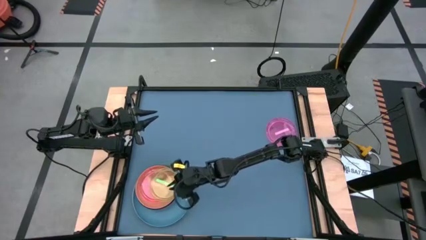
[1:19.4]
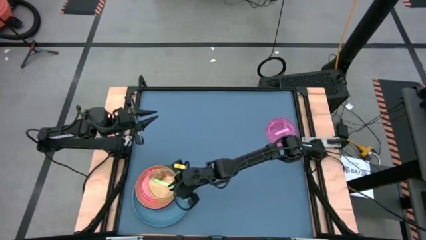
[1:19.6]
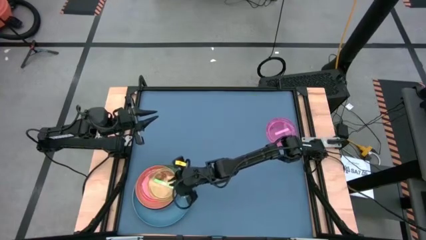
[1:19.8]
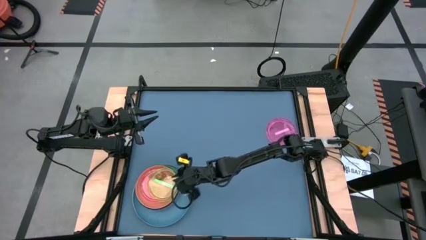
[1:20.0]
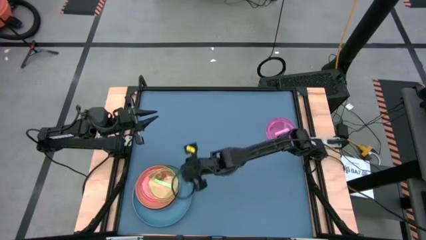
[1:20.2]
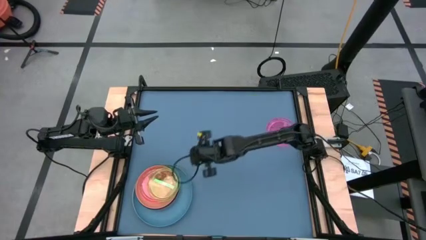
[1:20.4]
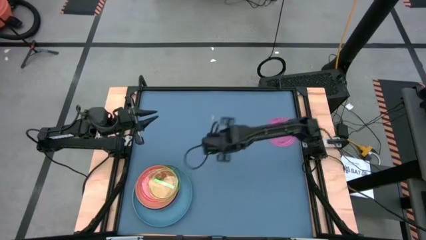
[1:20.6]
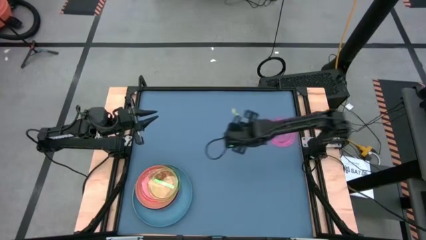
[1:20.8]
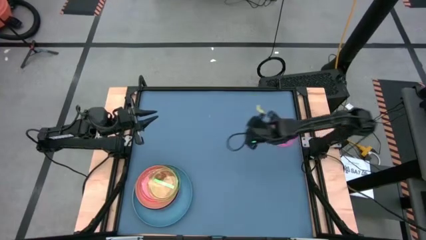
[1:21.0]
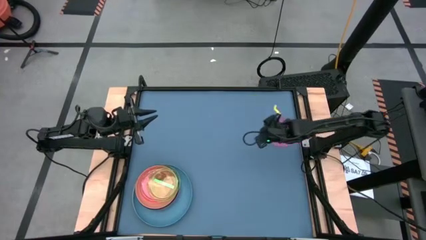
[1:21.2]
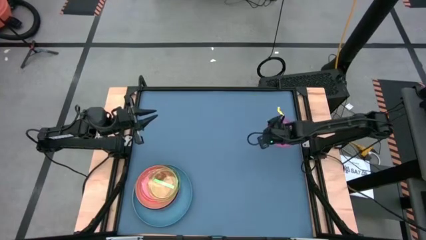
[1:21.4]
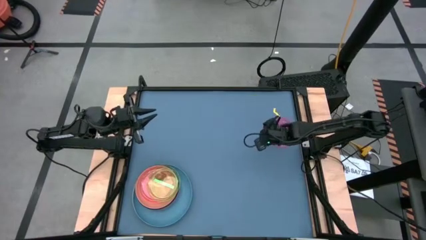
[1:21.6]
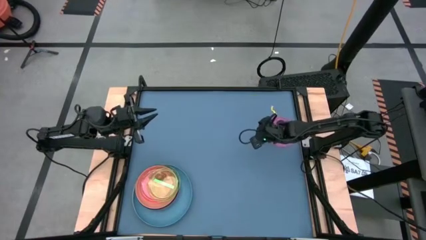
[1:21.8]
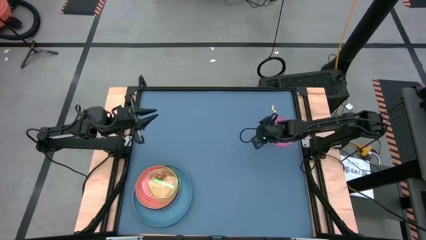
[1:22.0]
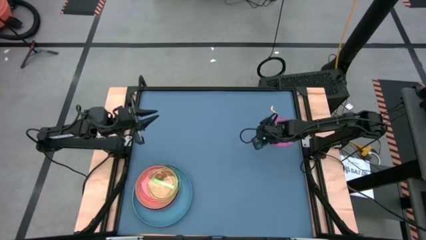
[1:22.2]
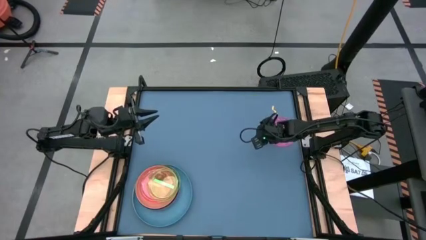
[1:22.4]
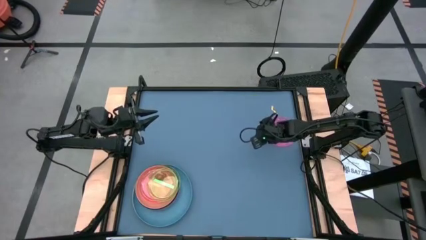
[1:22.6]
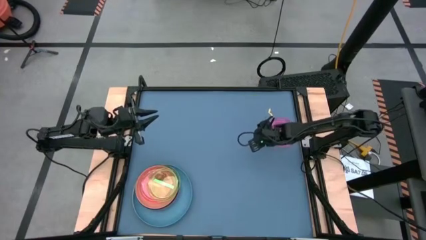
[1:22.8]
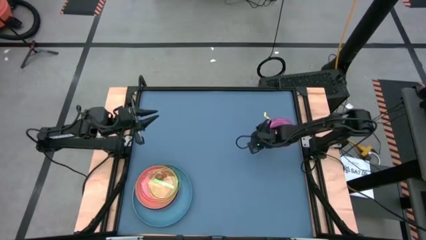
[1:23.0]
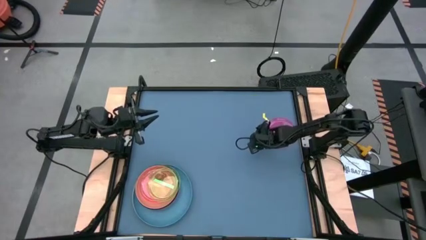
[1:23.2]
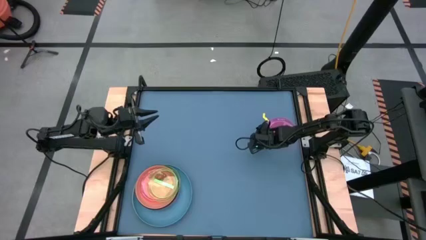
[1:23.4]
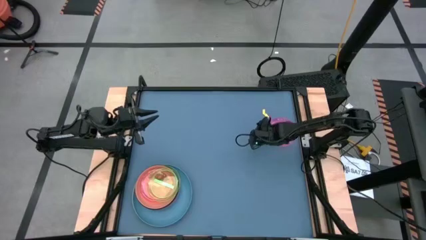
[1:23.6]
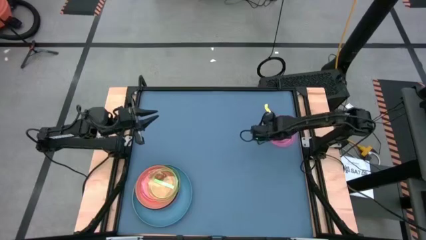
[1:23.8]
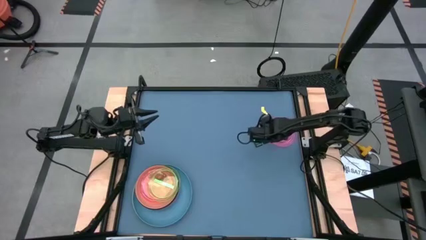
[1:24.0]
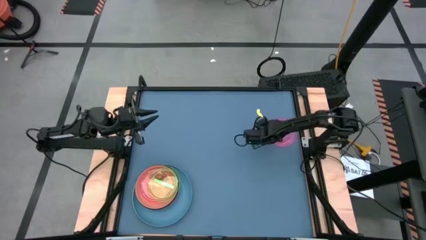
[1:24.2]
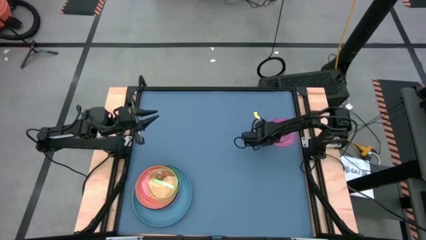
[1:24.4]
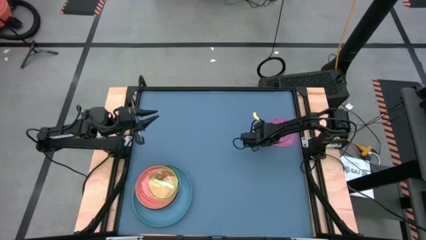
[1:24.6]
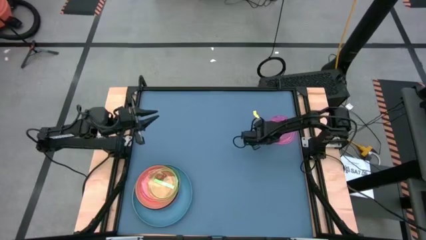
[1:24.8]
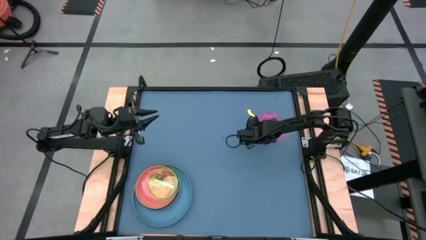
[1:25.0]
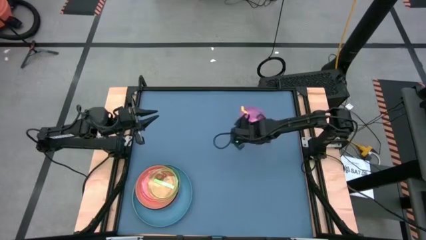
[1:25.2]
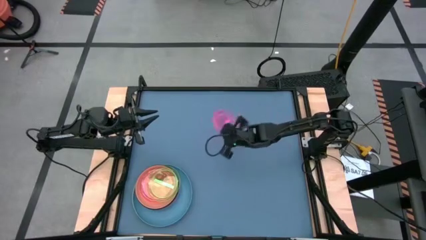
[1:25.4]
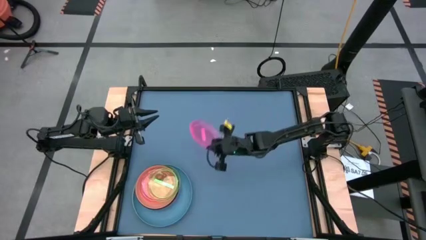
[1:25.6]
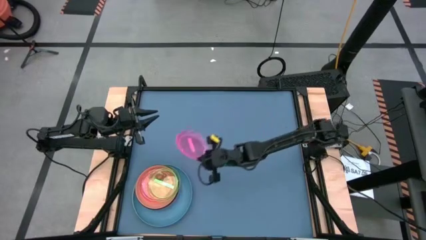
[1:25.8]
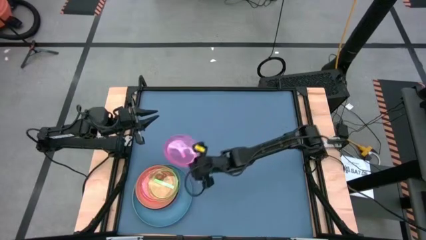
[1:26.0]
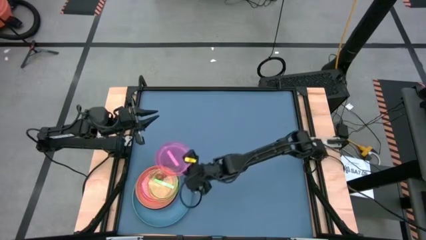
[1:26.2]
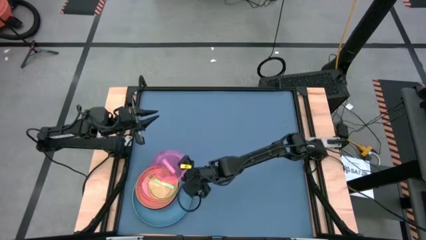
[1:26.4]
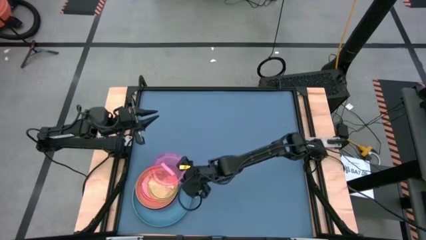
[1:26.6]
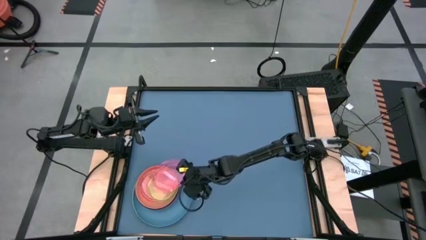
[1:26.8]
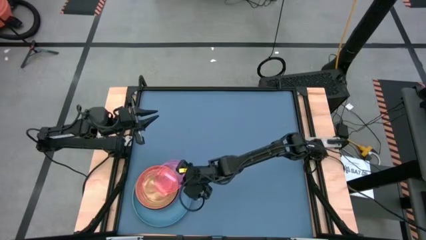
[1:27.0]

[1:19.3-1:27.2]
Task: Stack plastic plates
Stack the pink plate on top of the green plate

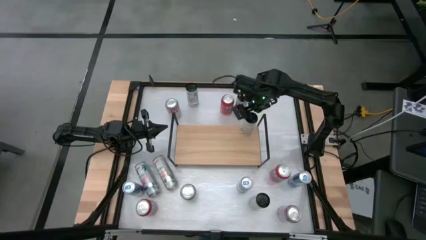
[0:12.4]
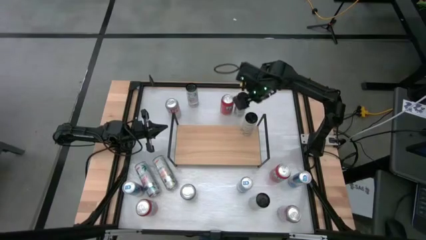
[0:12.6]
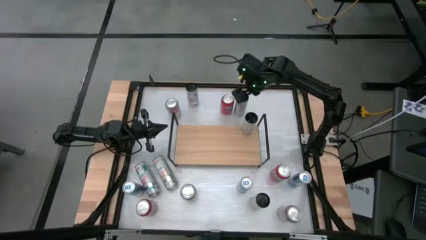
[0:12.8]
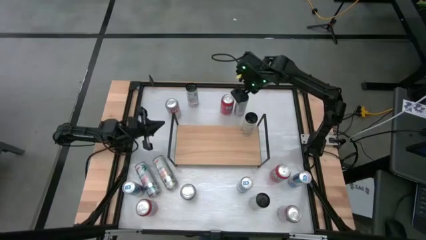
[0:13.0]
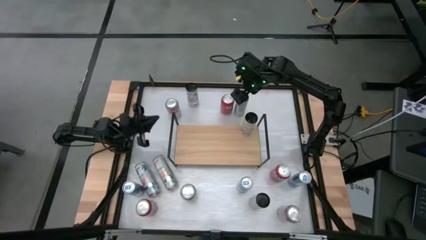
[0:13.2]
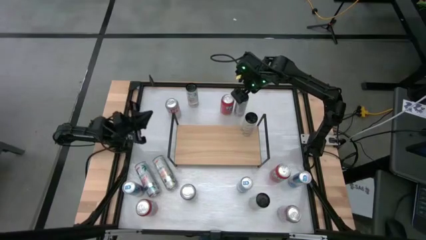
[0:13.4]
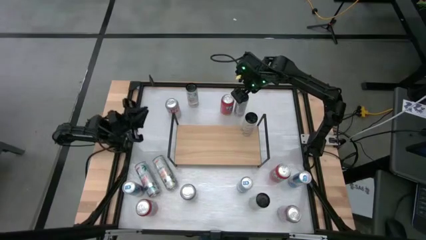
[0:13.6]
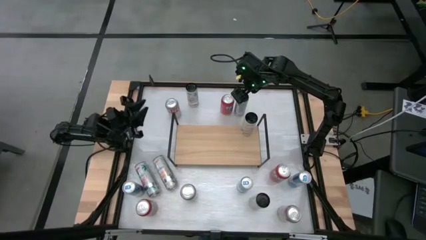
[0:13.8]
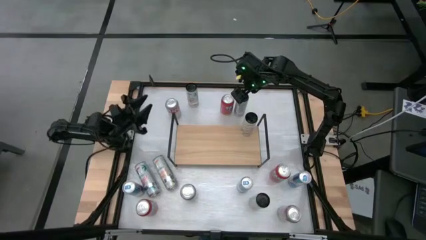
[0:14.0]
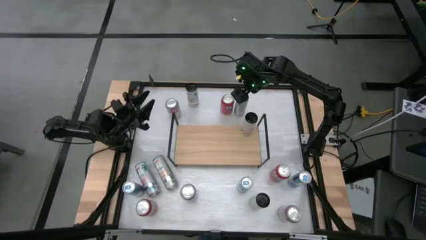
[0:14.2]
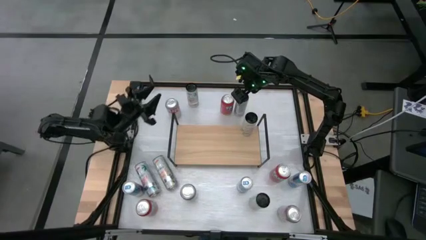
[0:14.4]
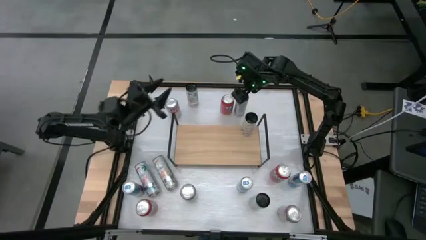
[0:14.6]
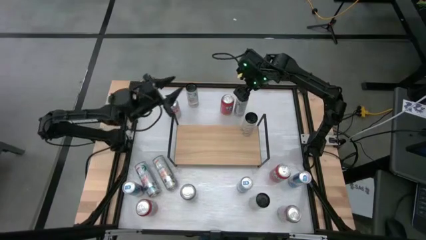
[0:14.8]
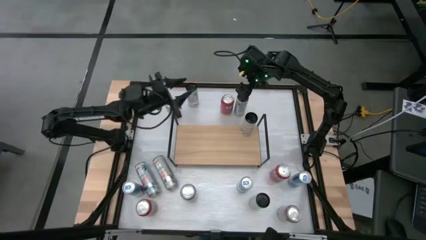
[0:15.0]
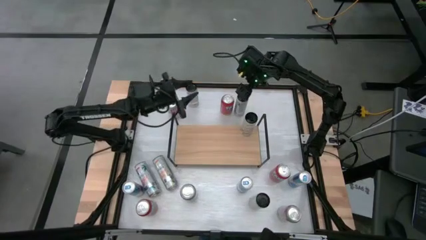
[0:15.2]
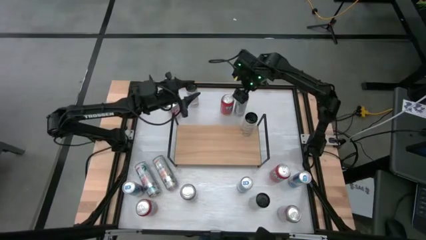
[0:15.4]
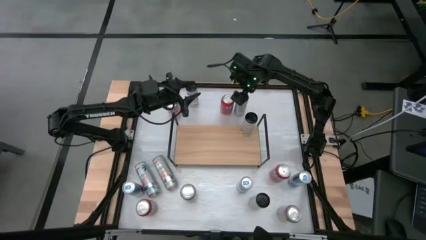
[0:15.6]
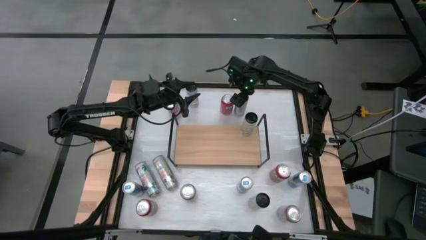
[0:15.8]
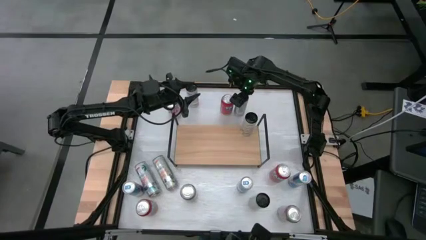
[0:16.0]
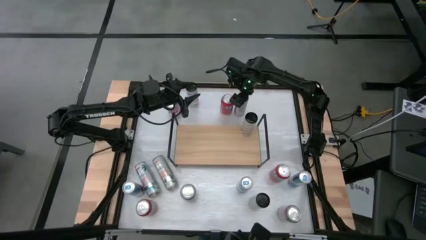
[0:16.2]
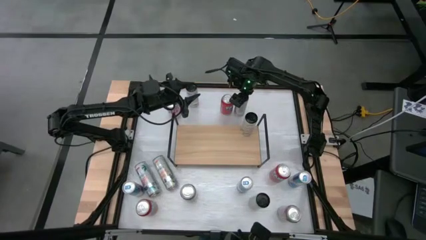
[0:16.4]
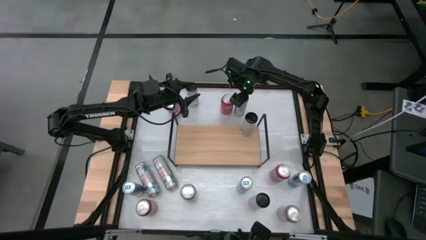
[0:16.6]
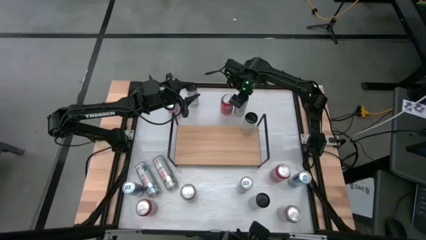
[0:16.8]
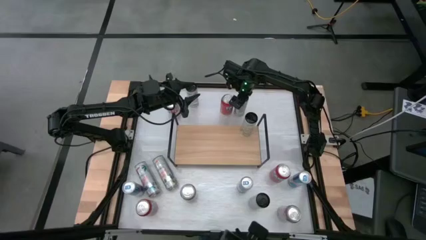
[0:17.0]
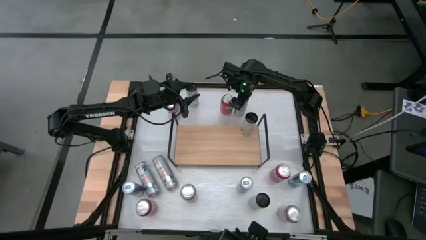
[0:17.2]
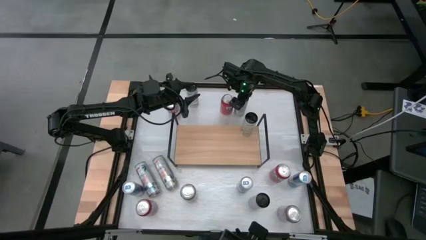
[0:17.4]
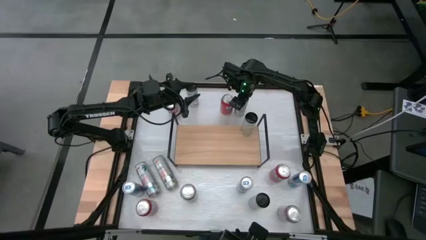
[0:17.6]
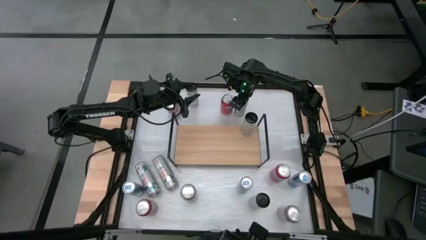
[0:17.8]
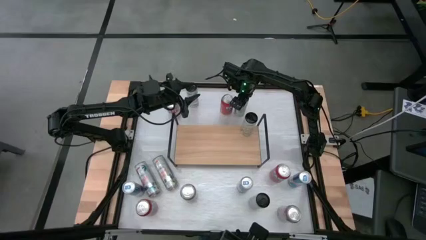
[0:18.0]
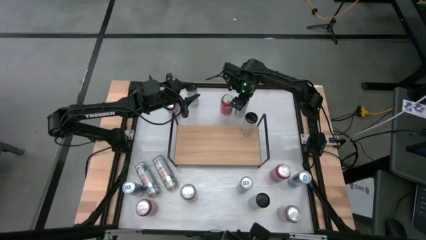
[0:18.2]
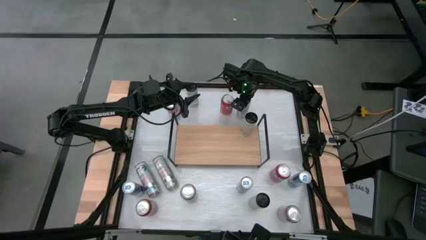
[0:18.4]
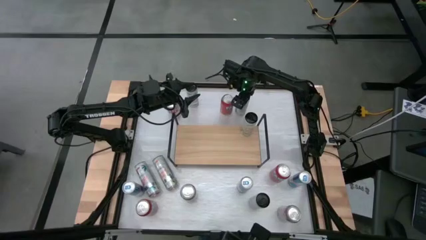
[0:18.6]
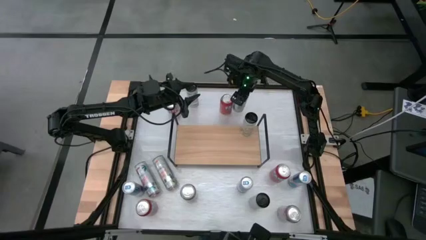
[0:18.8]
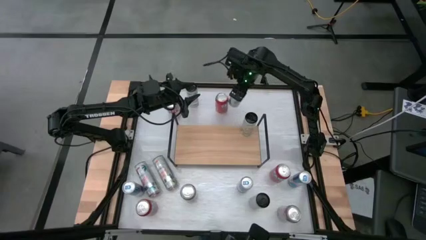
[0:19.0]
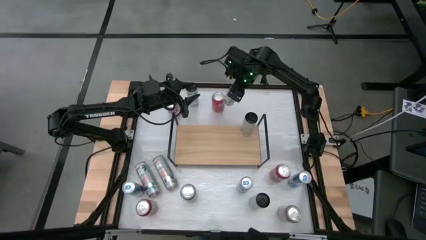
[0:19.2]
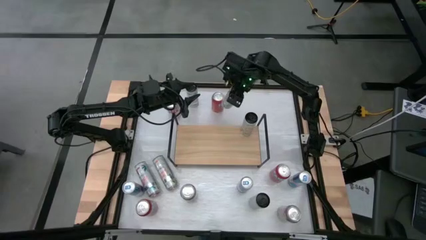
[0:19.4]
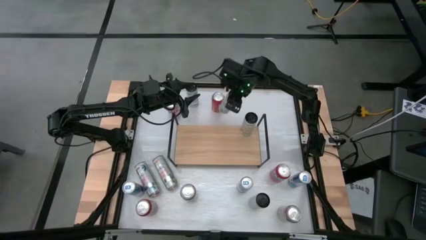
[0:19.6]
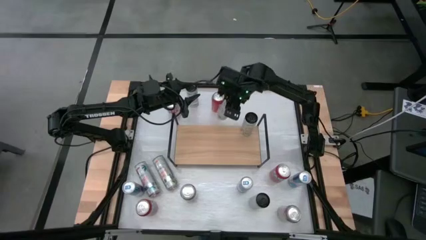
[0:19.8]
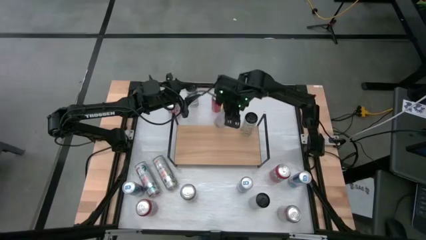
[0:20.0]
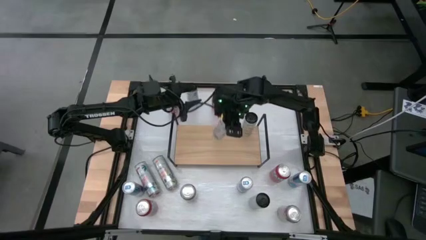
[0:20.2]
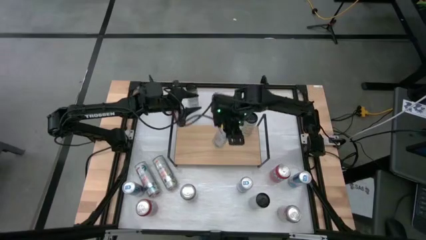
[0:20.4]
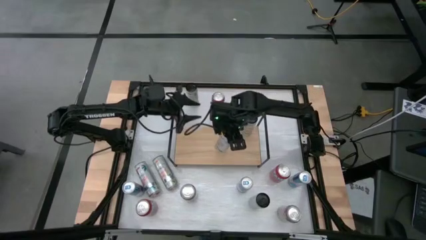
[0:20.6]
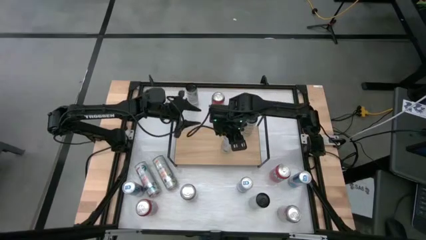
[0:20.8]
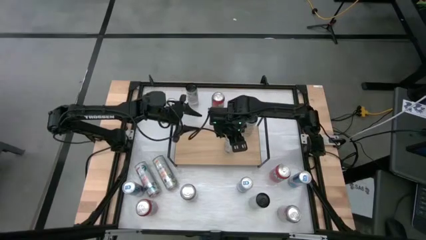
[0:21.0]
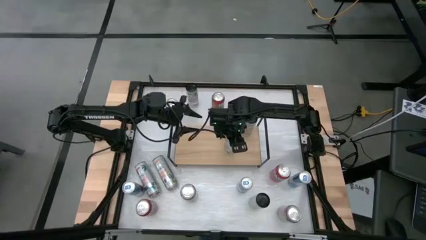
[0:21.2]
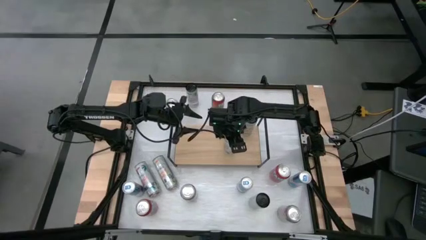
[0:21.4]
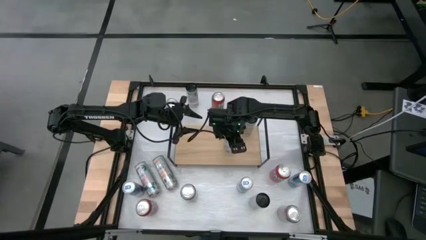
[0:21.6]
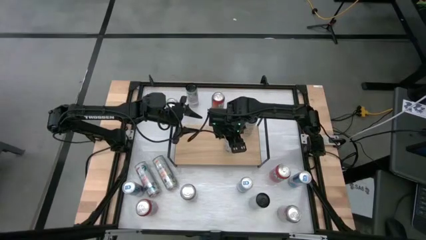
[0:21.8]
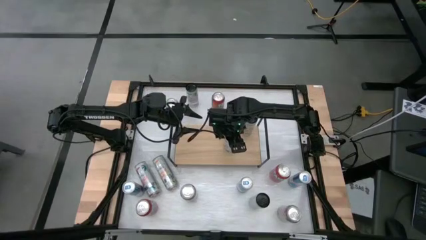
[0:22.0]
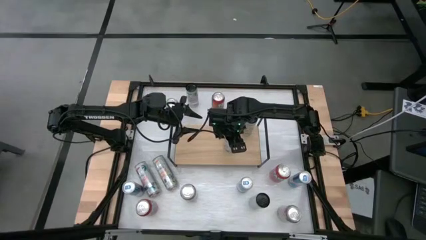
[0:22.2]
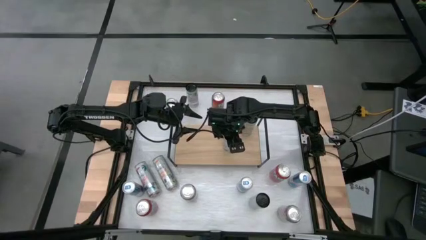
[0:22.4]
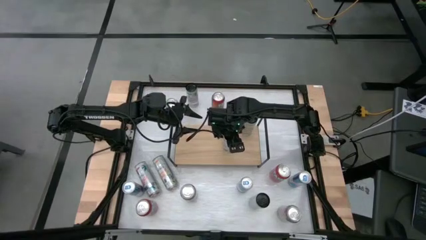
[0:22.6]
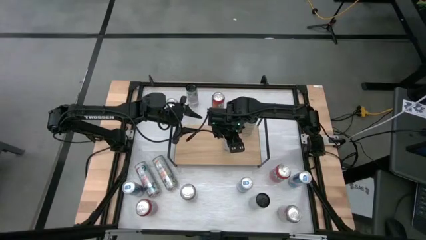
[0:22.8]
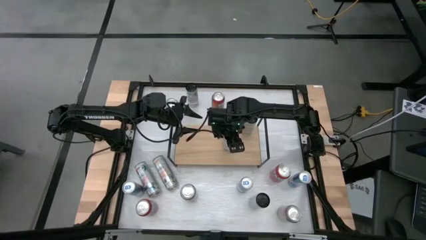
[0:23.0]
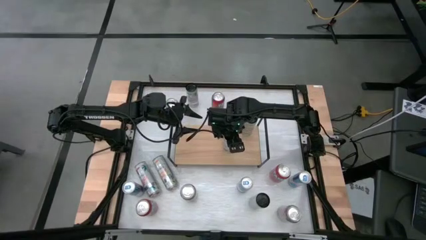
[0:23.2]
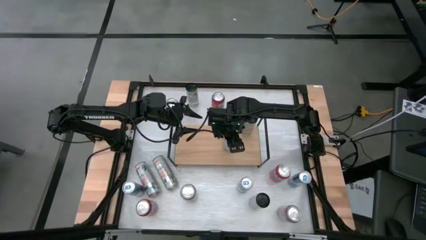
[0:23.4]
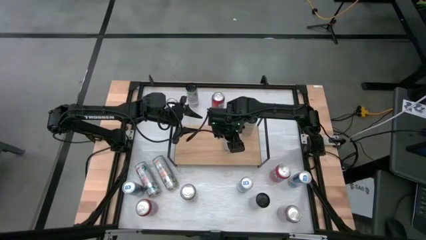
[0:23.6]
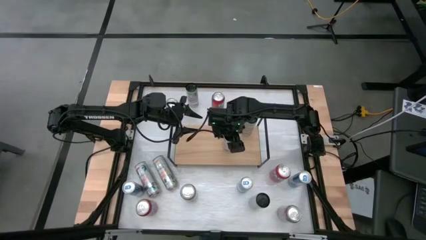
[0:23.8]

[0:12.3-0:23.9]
Task: Place canned beverage on shelf
Put the top right white-pink soda can on the shelf
